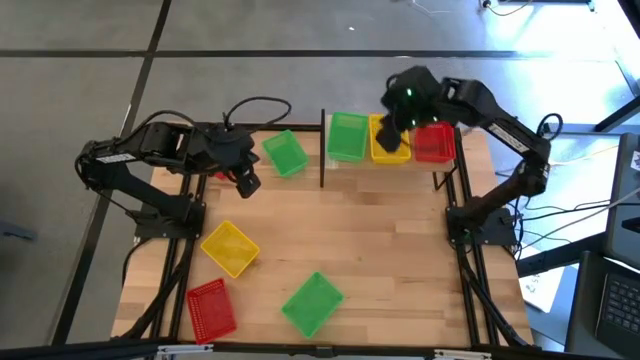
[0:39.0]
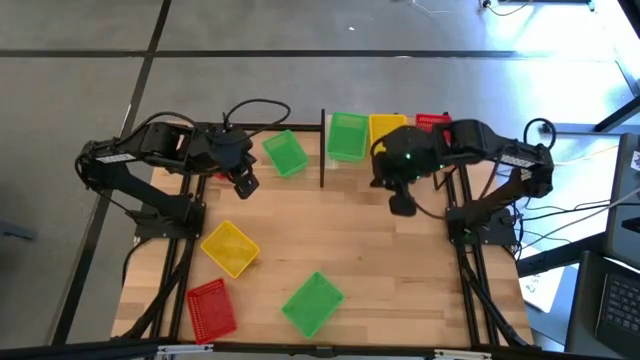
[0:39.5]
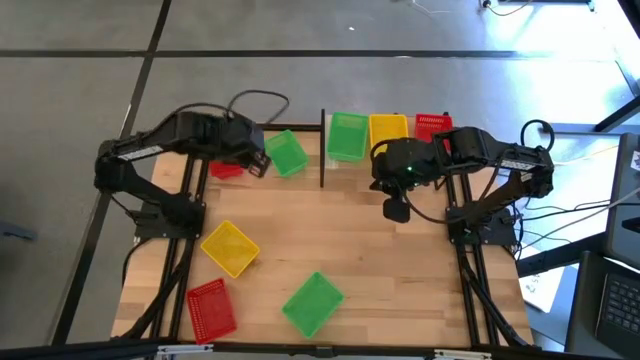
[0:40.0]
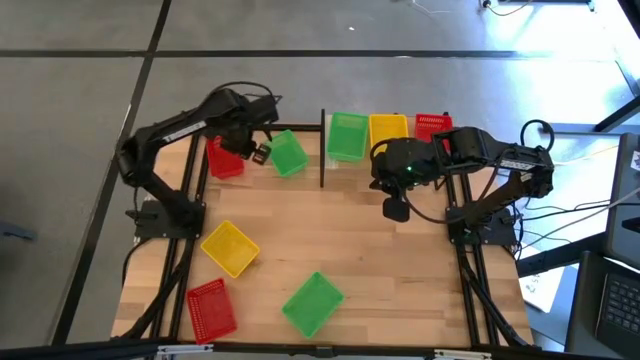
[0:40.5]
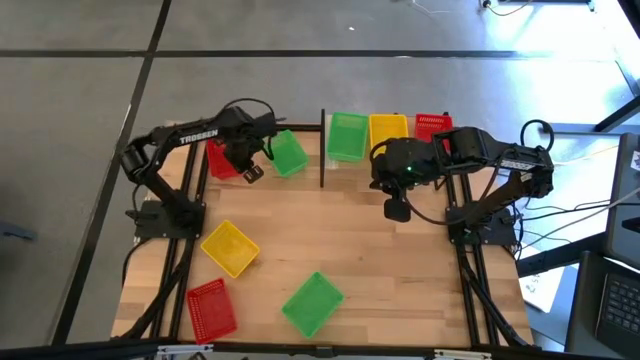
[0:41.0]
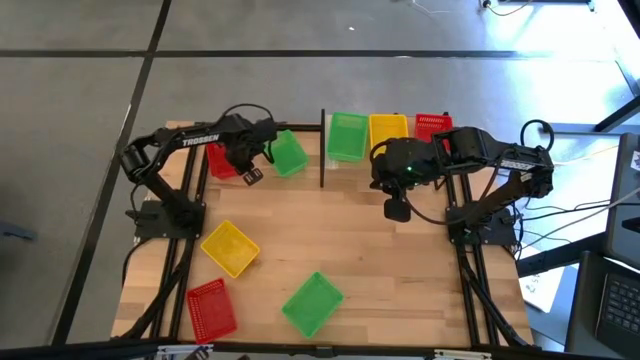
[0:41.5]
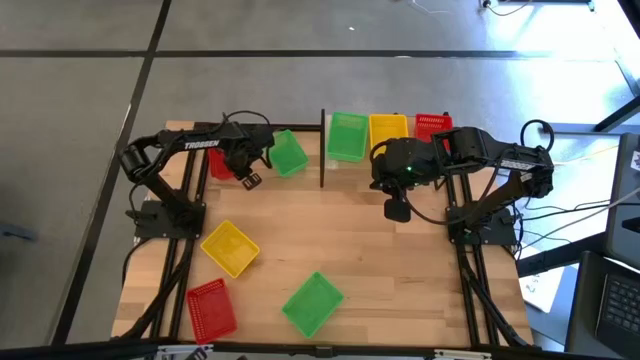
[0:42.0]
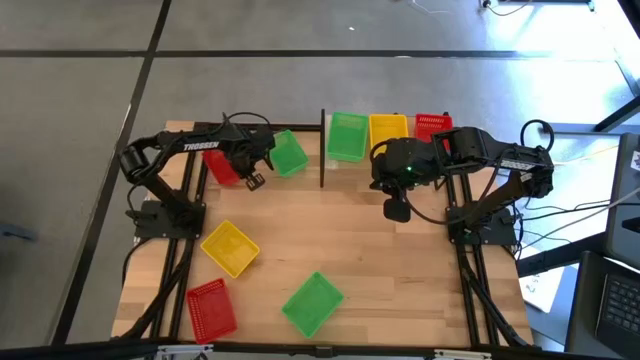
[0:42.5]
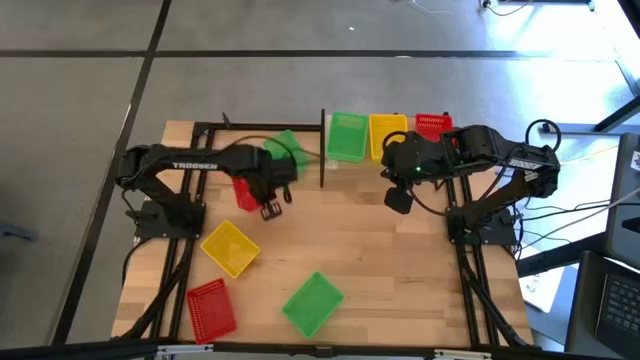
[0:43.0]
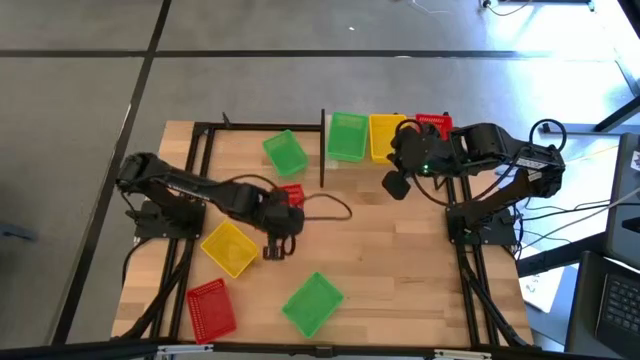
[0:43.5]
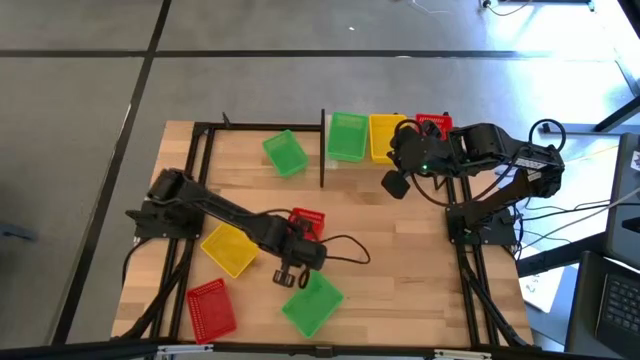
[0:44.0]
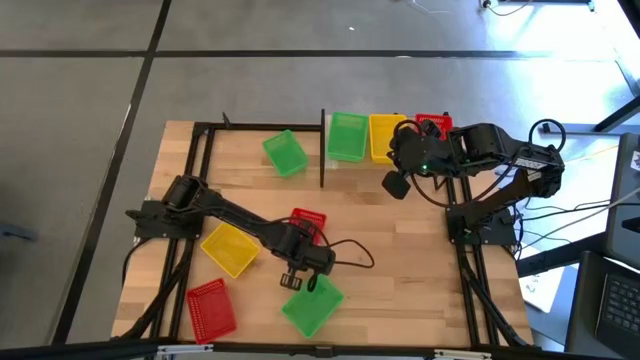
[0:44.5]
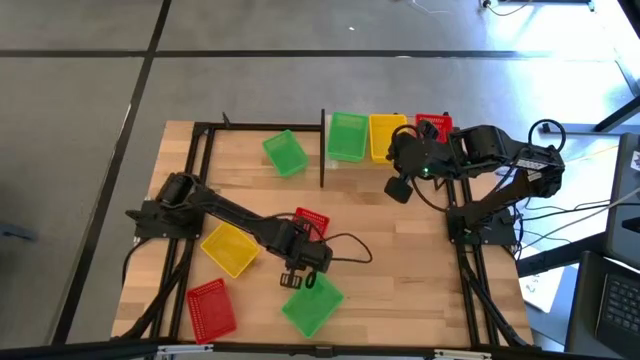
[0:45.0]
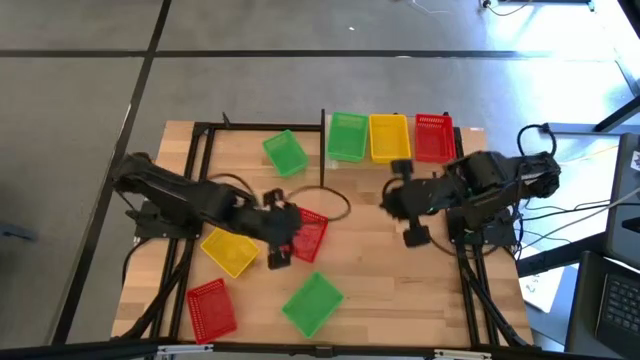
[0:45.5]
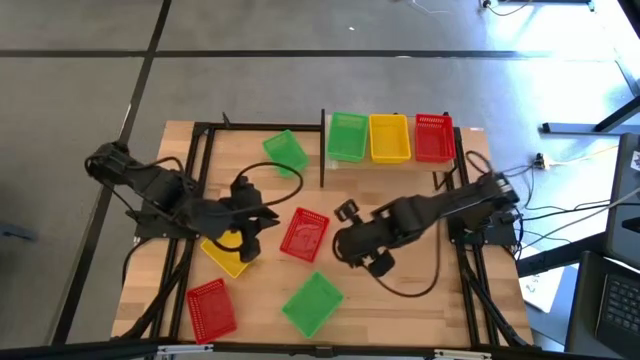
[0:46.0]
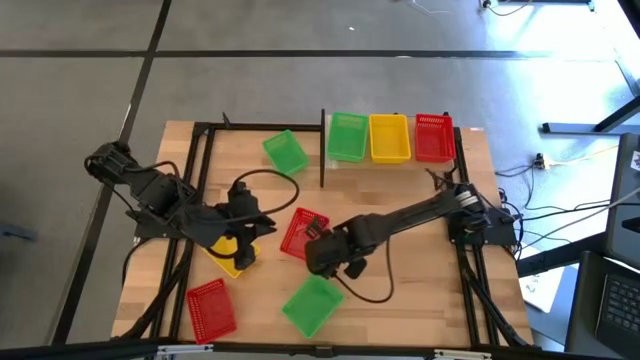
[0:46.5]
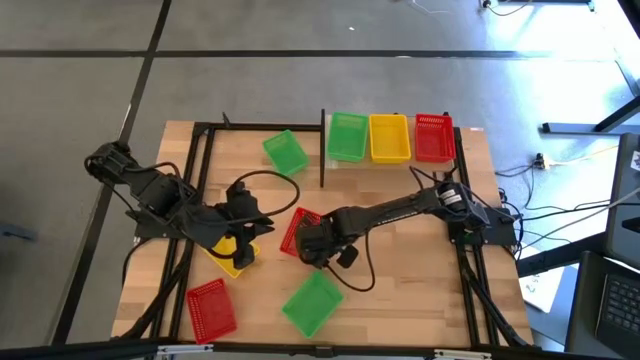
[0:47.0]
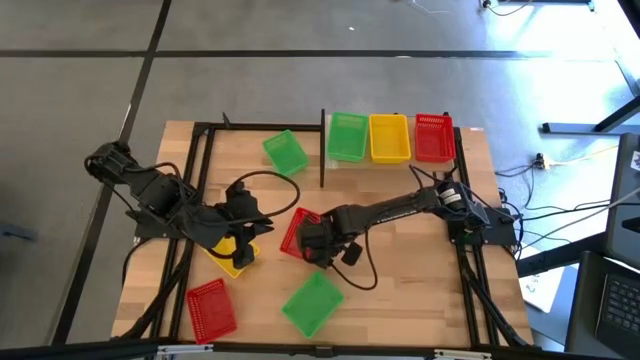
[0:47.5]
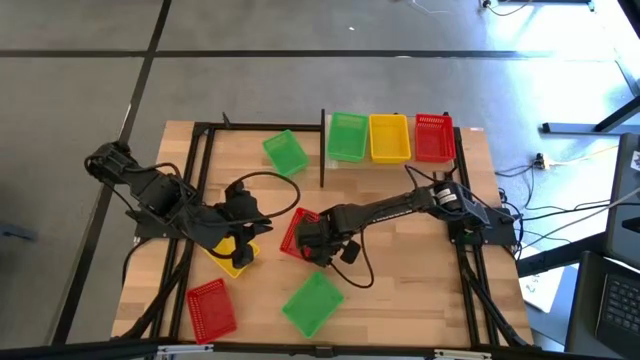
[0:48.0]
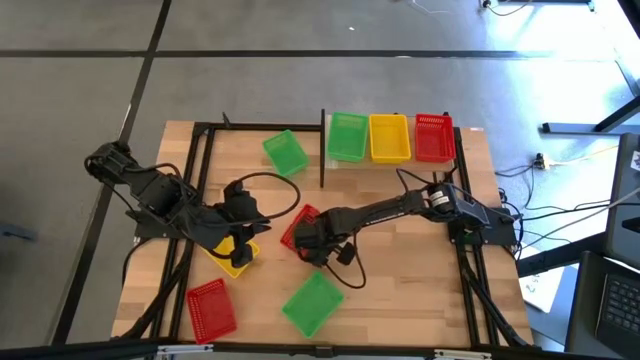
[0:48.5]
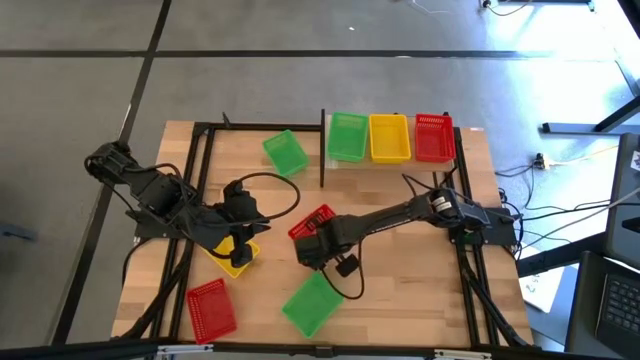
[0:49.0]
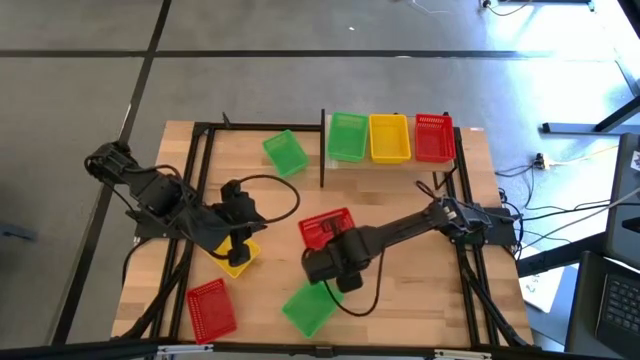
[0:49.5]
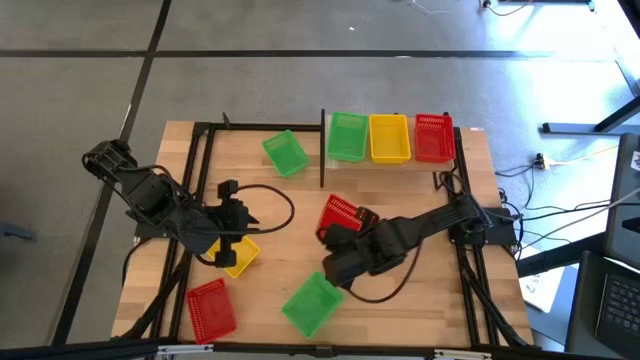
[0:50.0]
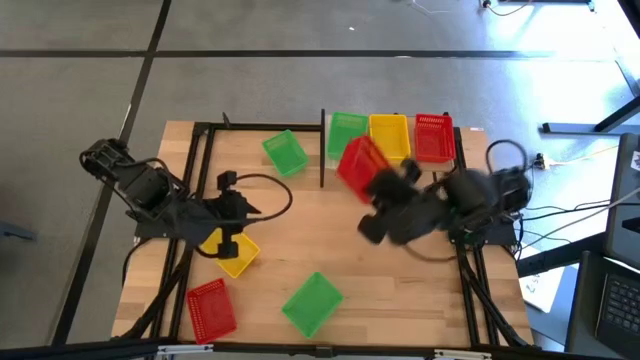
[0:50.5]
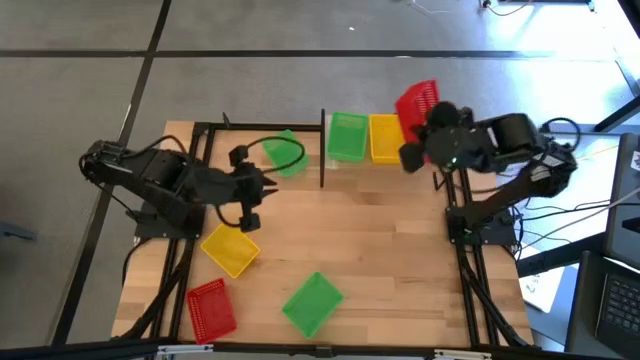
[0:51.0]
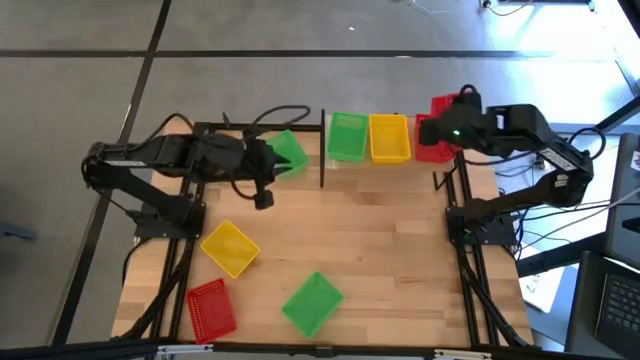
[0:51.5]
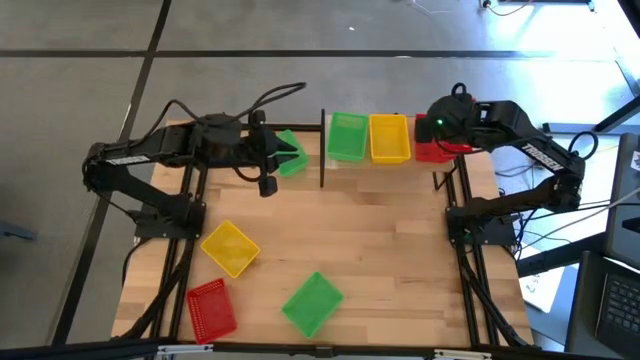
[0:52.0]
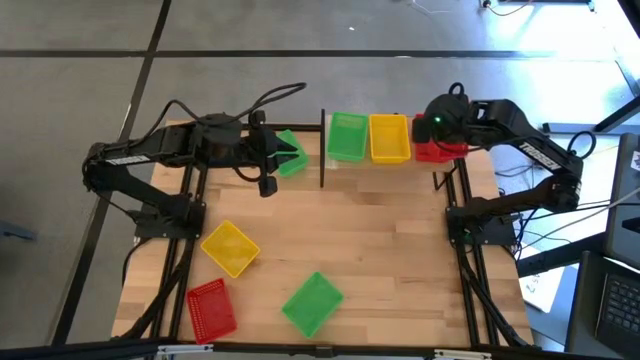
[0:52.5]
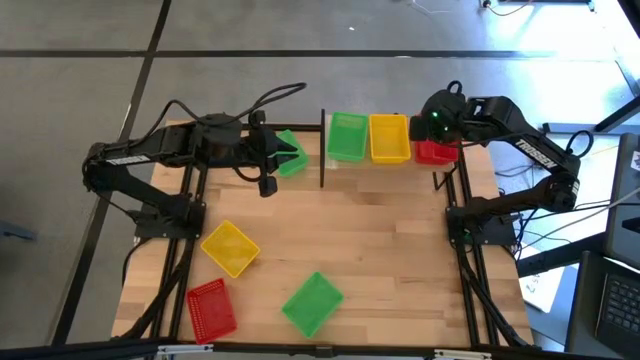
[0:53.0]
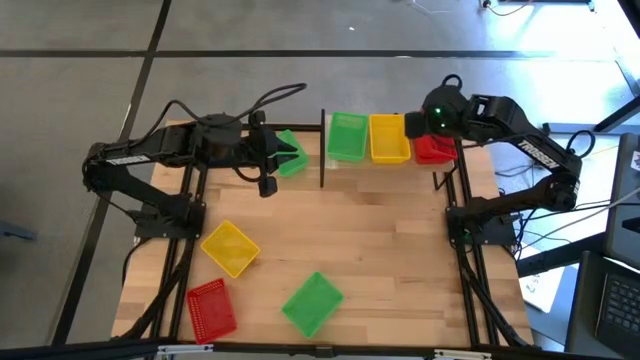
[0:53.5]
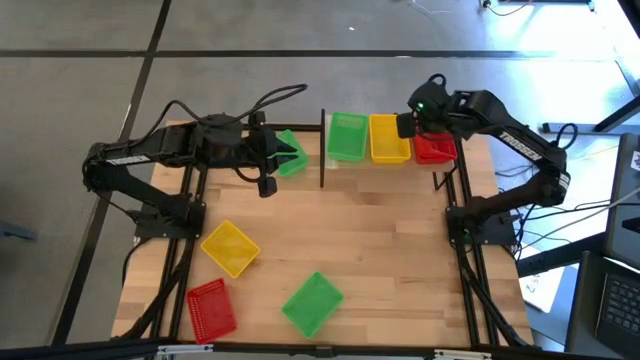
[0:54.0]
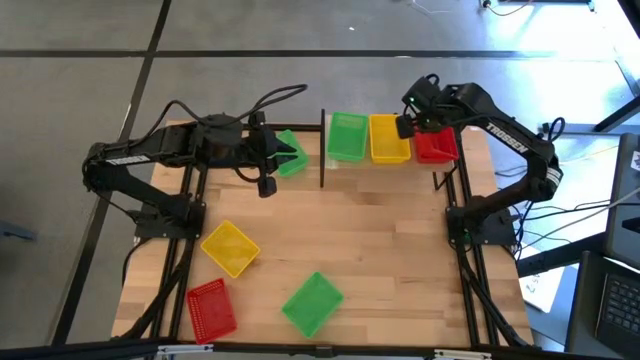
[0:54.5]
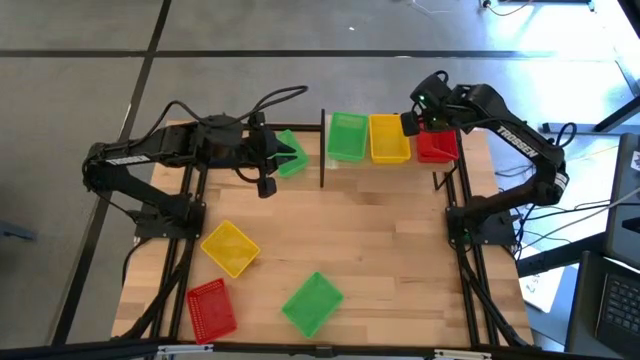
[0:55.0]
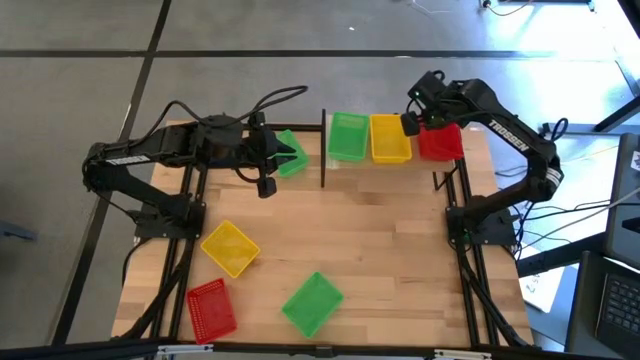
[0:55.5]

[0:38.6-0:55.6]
Task: Stack baskets on shelf by color
Stack the top red bin on the red bin on the shelf

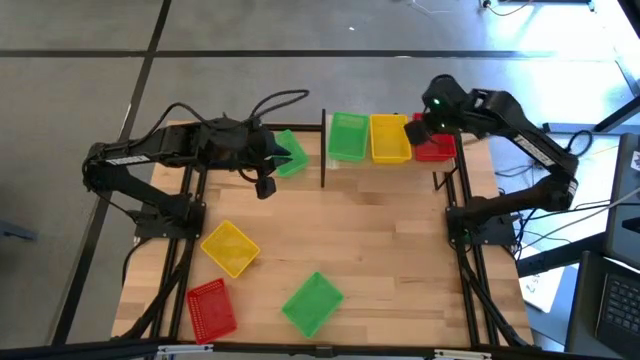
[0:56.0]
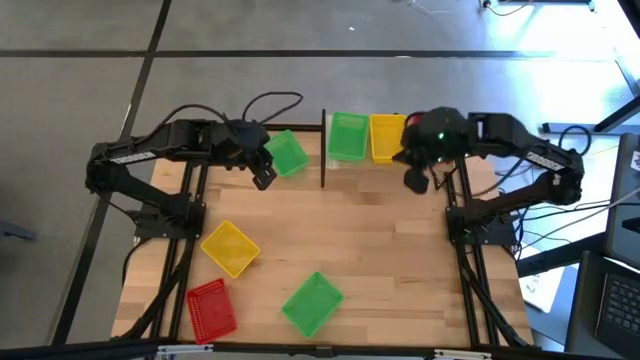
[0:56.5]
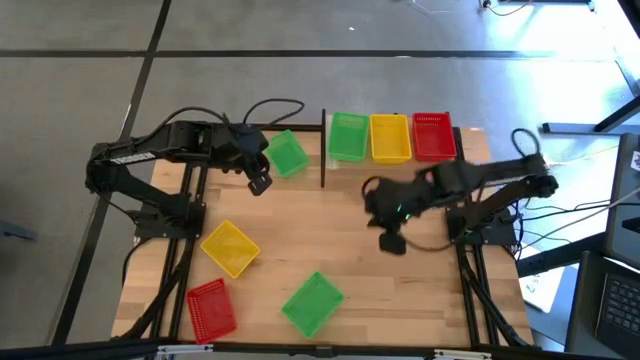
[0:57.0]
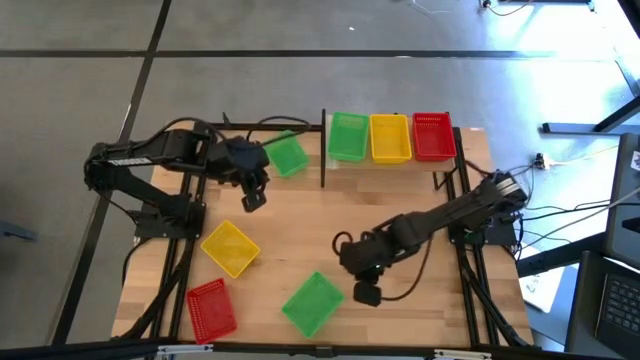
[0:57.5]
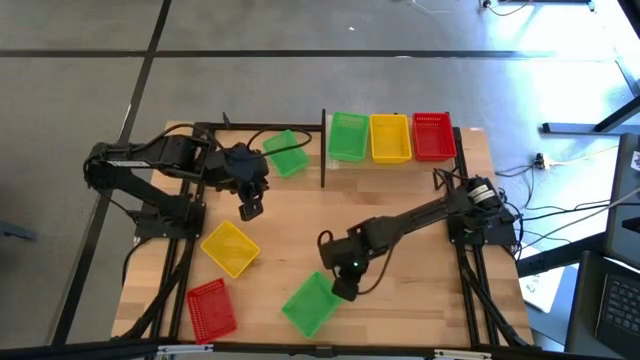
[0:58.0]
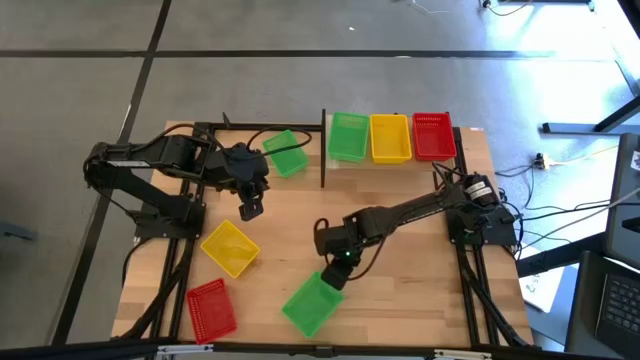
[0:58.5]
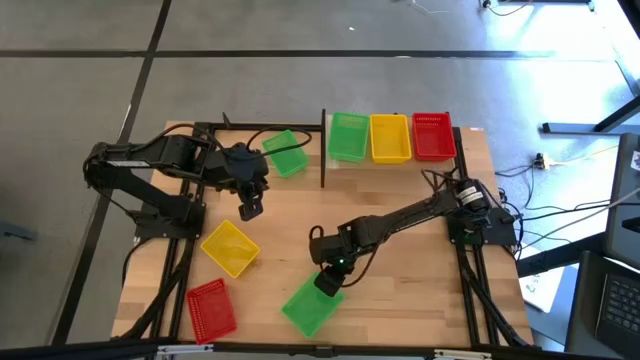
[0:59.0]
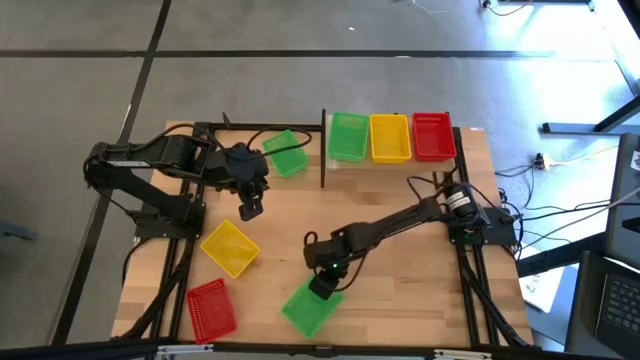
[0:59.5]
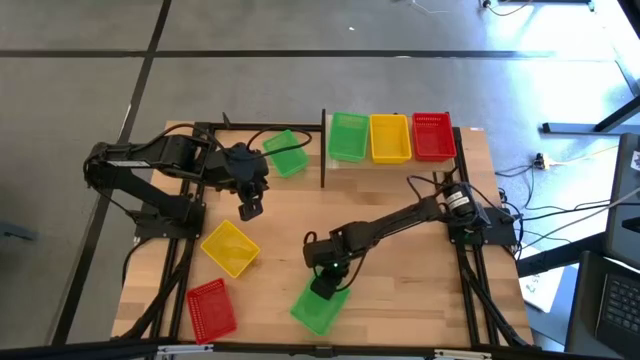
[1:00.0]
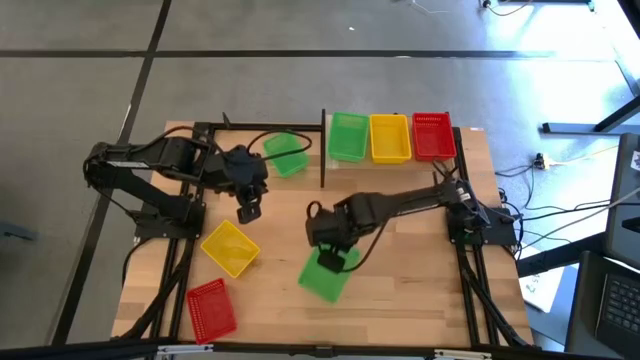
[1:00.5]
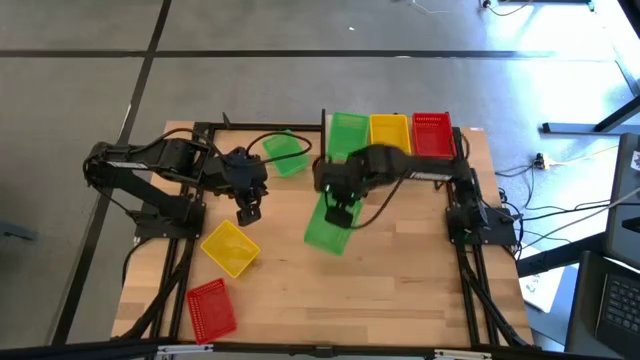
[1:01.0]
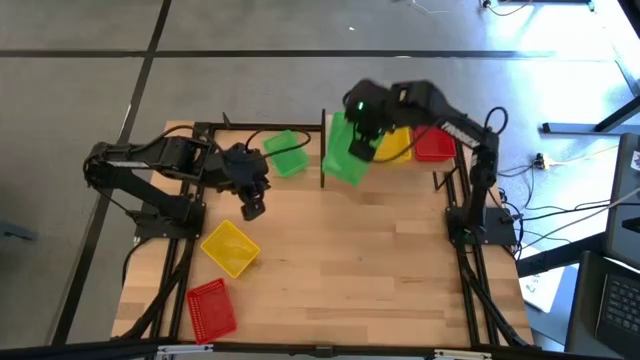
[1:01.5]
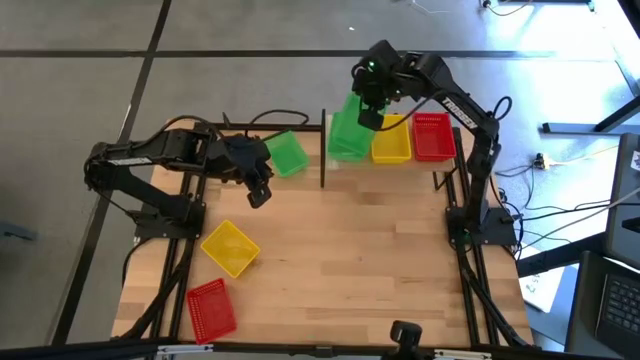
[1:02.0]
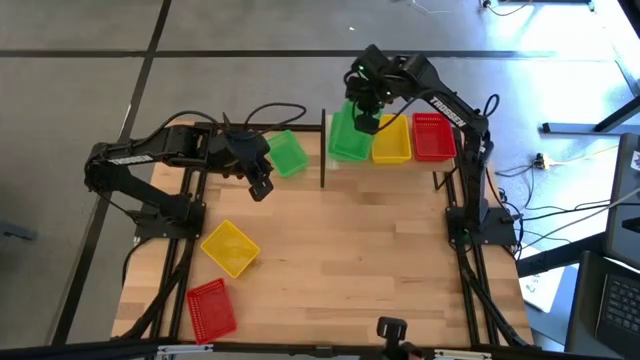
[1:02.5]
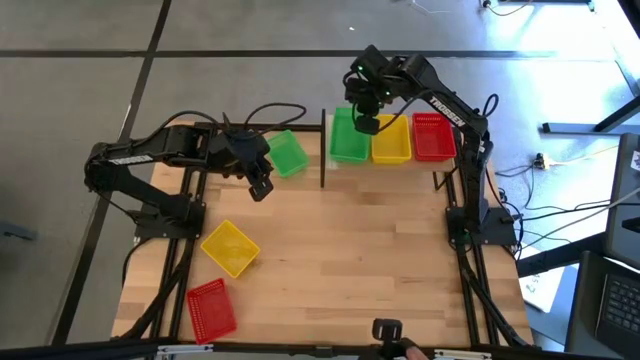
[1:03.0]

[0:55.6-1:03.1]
Stack the bottom green bin on the green bin on the shelf
